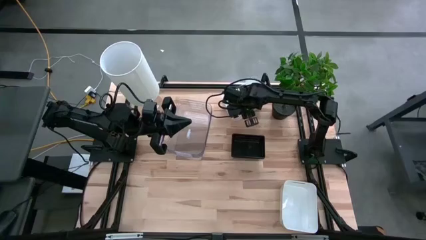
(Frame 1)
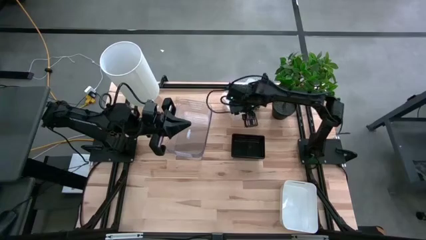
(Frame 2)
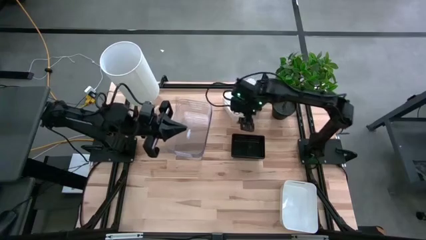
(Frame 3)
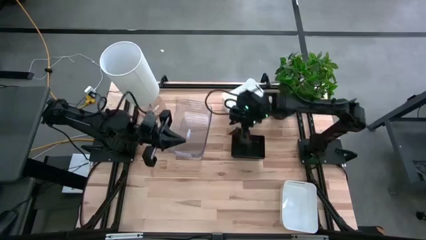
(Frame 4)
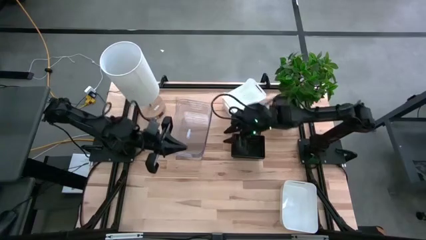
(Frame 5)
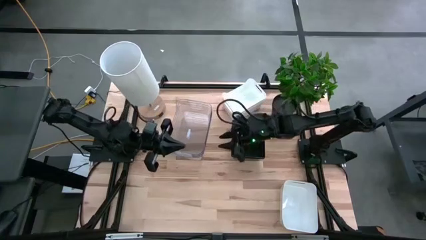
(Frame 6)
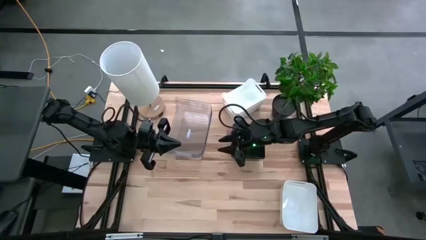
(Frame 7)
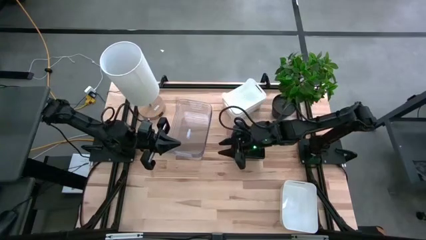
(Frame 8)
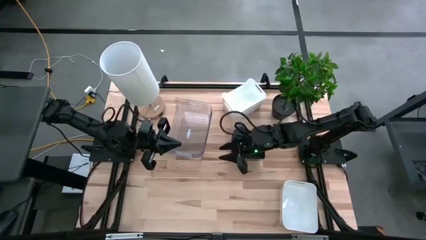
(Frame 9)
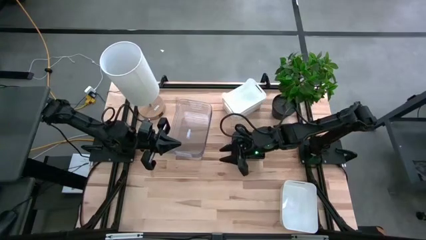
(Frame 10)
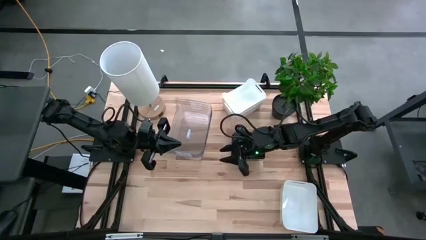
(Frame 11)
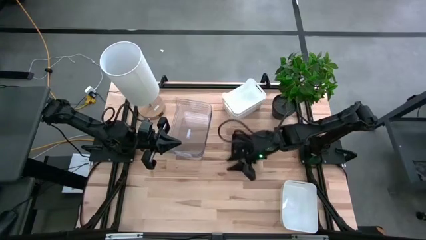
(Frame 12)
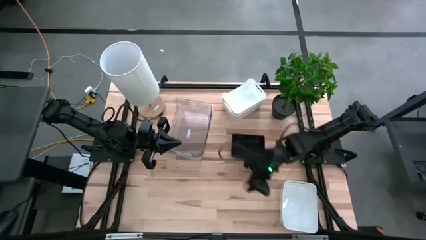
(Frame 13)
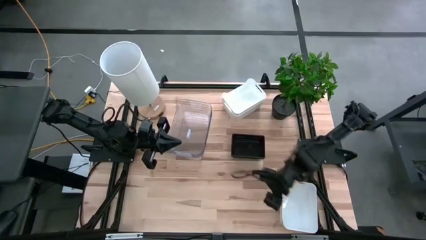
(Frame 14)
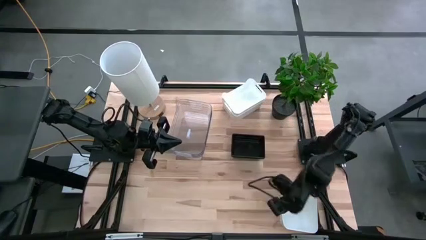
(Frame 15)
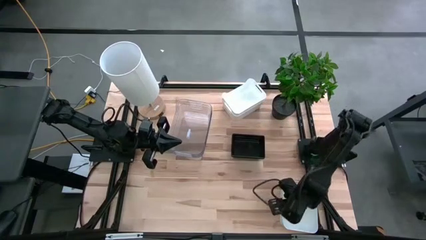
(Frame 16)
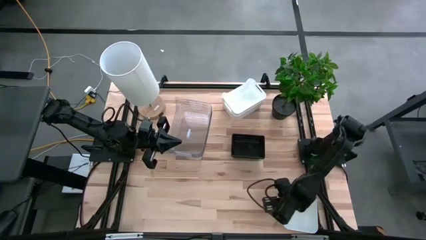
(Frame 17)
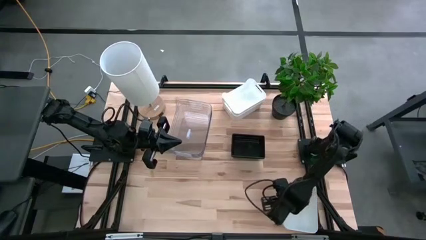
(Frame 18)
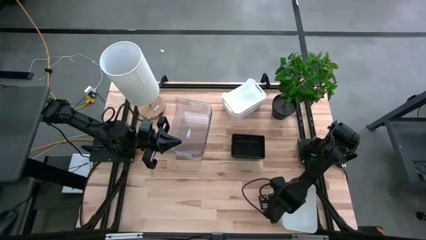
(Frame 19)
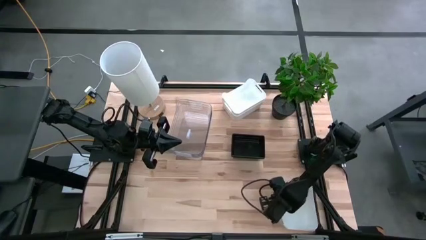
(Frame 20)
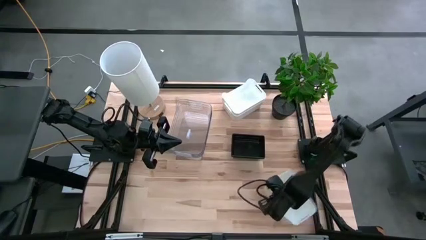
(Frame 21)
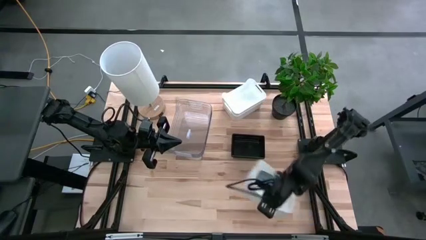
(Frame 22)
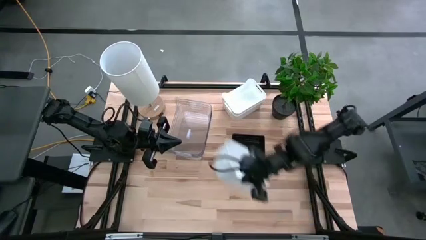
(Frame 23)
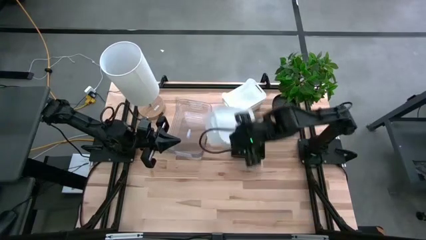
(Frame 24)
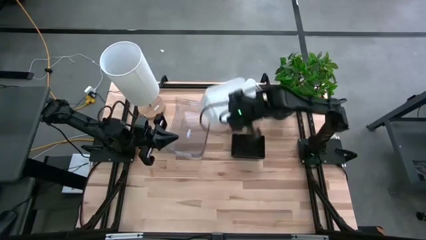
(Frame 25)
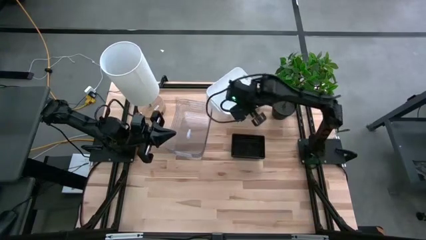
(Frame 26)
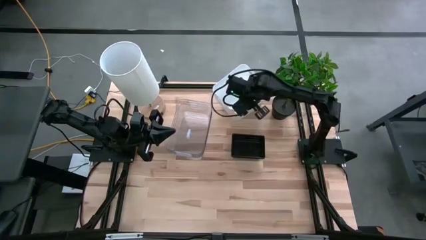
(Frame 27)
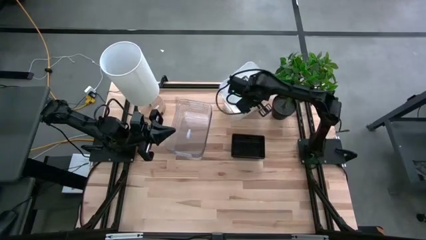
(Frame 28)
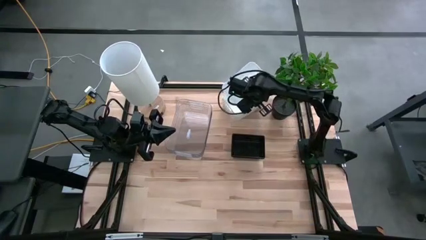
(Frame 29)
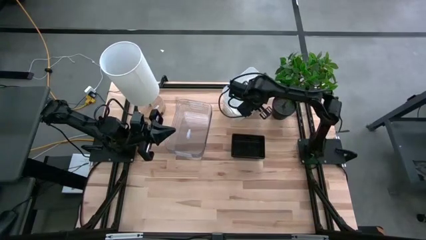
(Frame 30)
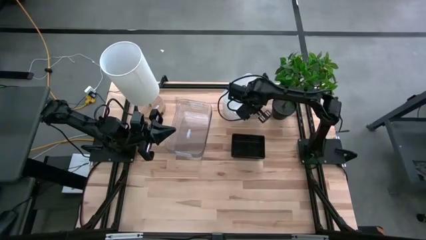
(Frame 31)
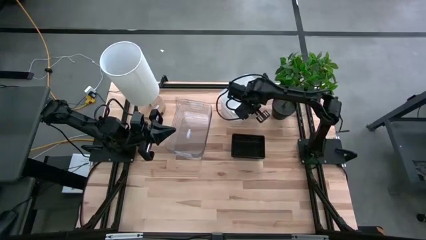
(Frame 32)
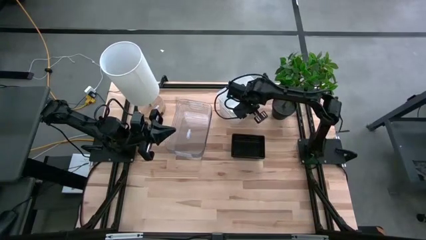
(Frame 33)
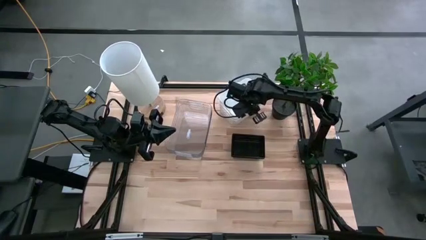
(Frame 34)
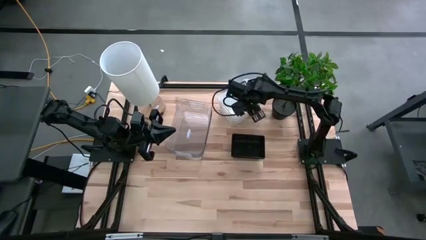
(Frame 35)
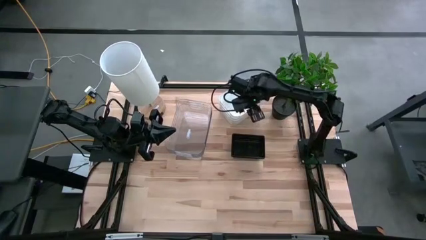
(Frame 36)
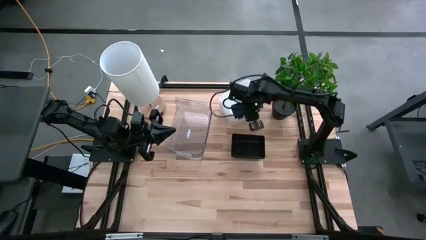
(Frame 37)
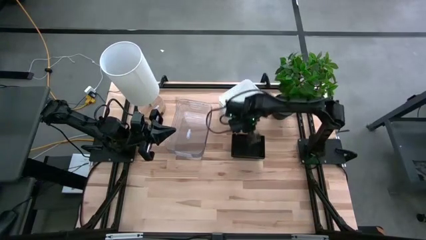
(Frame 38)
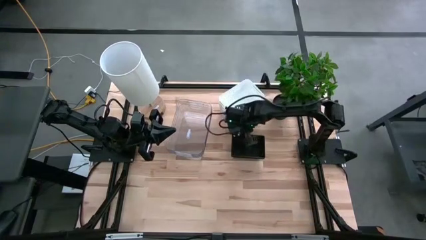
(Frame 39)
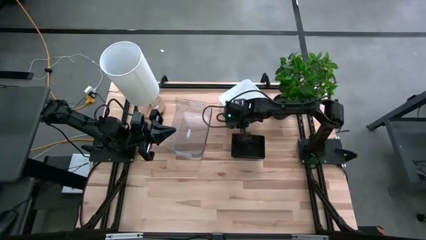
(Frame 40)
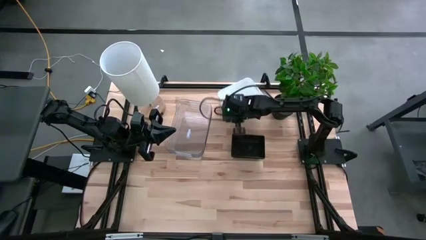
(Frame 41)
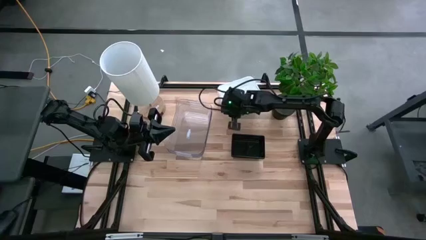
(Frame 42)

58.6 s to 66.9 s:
Stack the bottom white bin on top of the top white bin

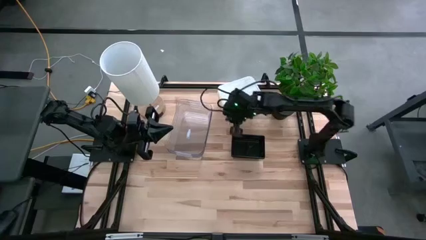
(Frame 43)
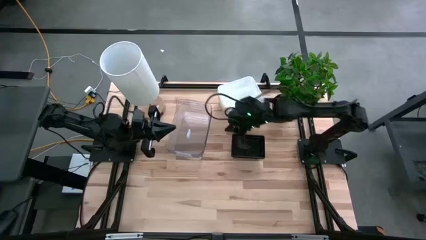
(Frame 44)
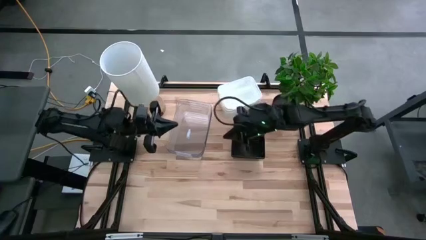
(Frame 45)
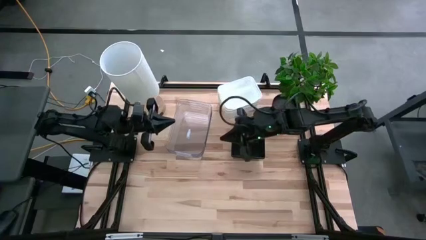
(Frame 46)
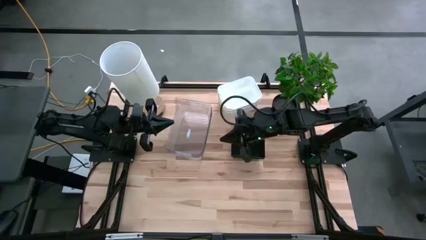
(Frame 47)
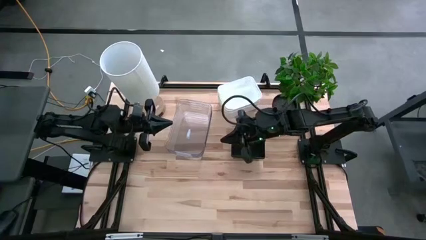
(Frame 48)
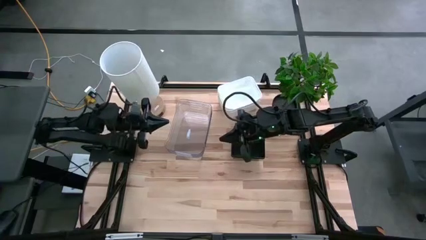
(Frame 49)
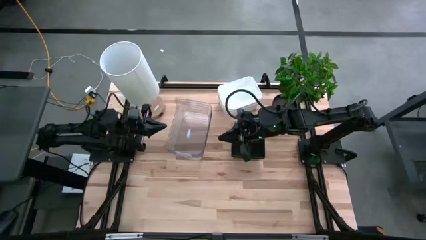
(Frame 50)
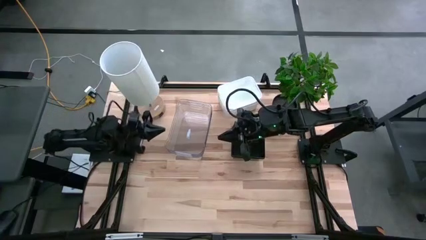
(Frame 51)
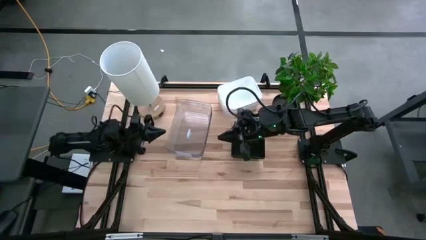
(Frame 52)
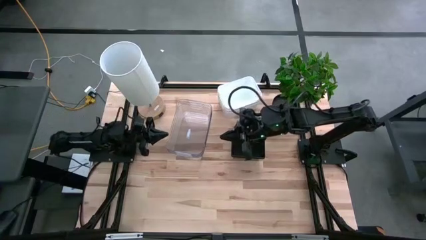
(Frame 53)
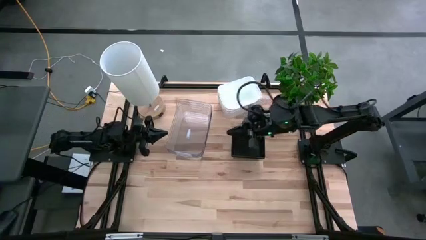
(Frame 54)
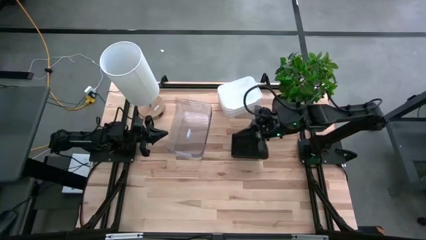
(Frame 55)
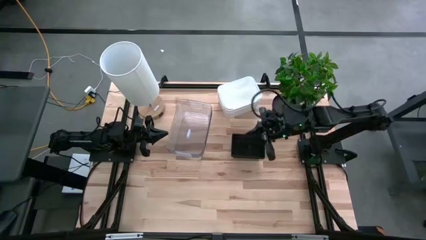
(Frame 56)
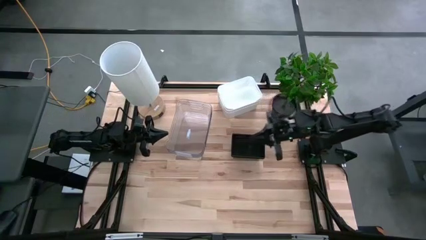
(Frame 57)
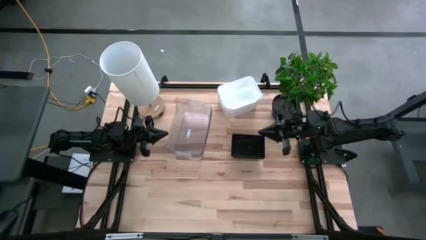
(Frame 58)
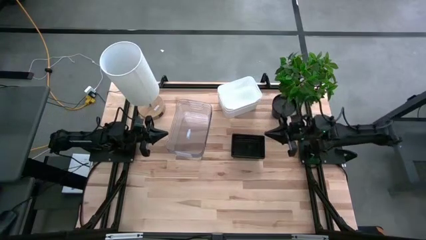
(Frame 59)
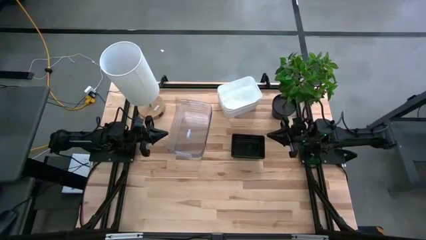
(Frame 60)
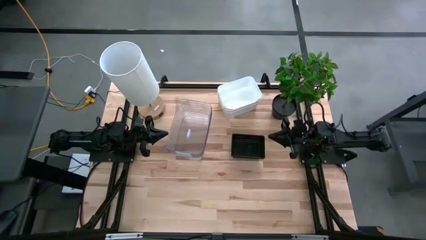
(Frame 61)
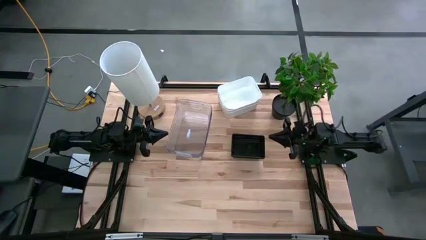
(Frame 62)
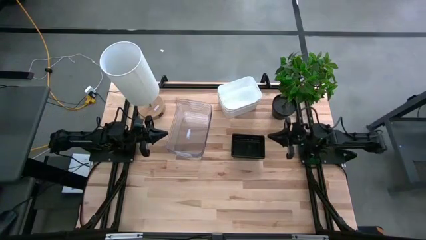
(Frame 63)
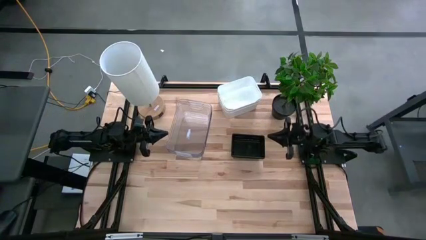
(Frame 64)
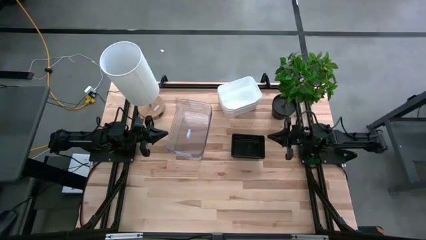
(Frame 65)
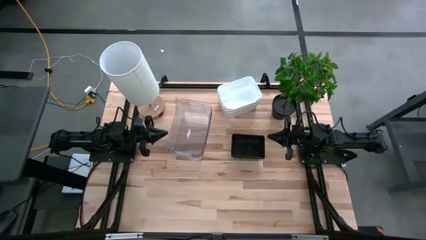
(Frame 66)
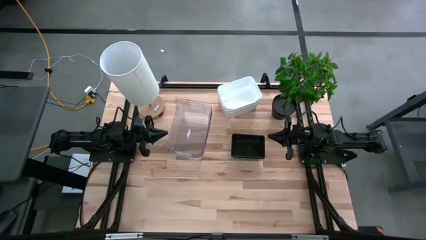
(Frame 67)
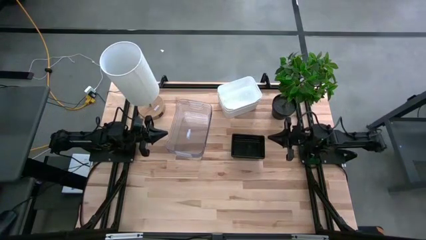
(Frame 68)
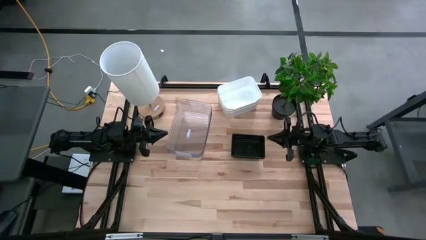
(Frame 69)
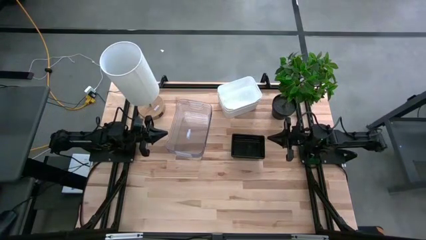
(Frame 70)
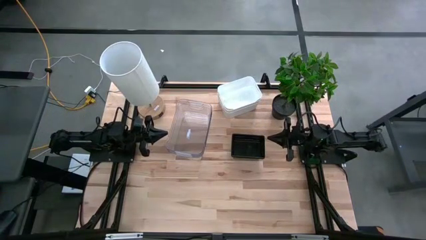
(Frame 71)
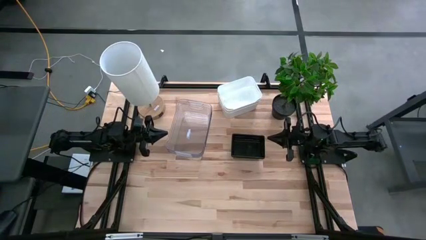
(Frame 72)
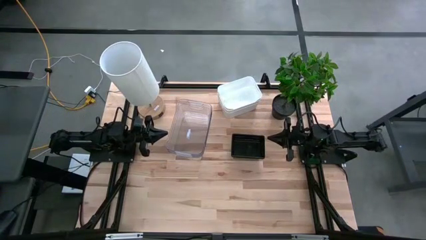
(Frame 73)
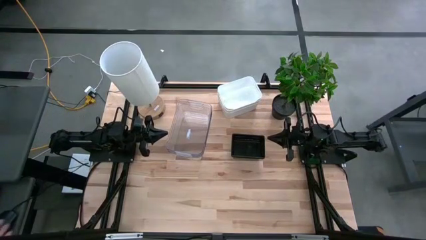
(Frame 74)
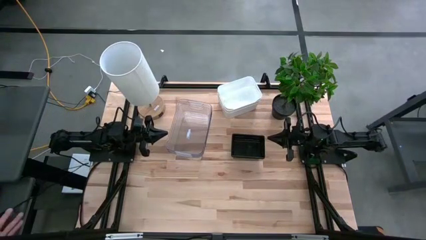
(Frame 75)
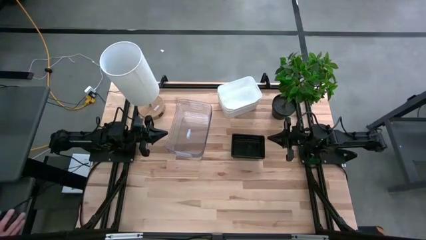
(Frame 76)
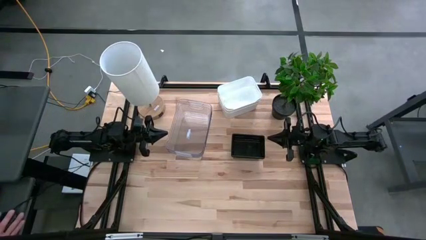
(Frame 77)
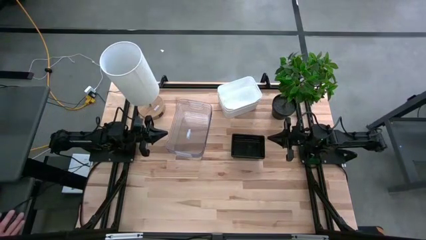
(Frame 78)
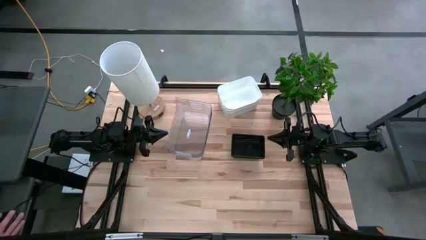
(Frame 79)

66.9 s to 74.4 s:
Return to Home Position
